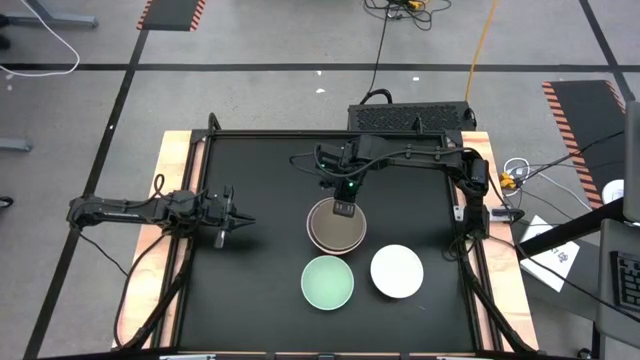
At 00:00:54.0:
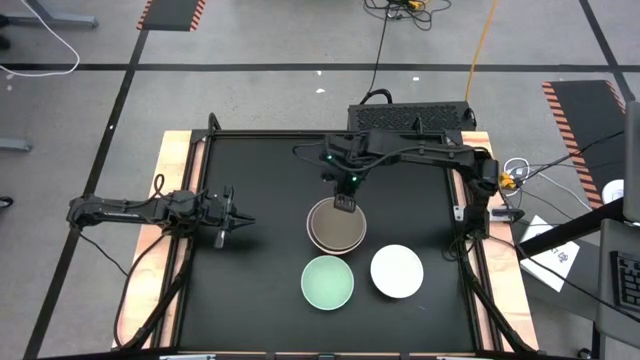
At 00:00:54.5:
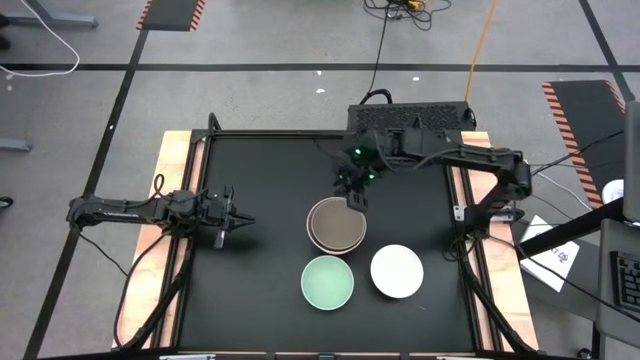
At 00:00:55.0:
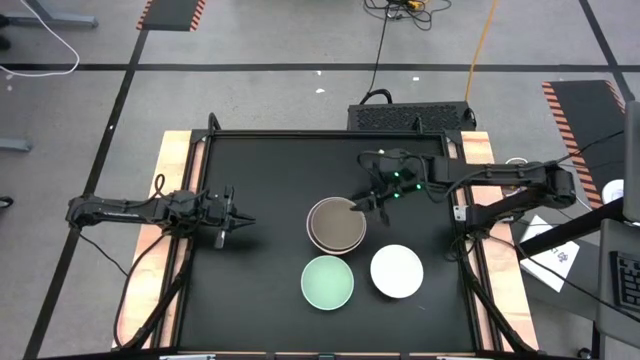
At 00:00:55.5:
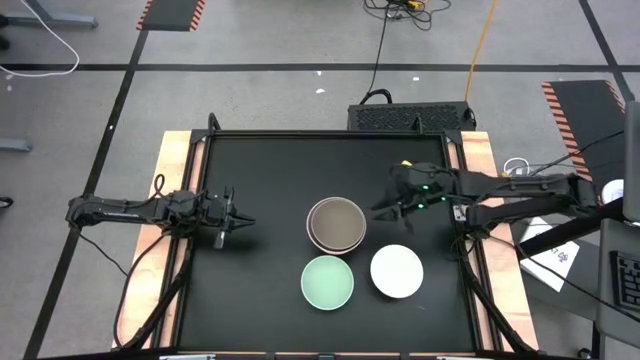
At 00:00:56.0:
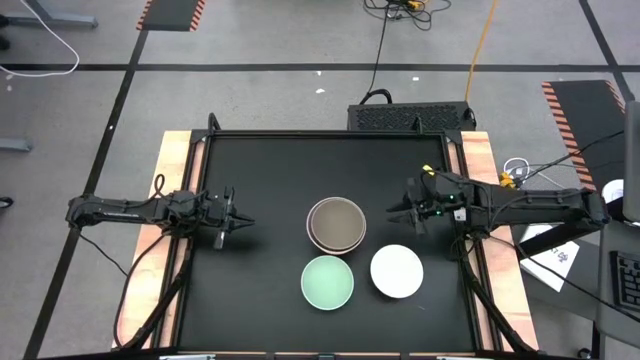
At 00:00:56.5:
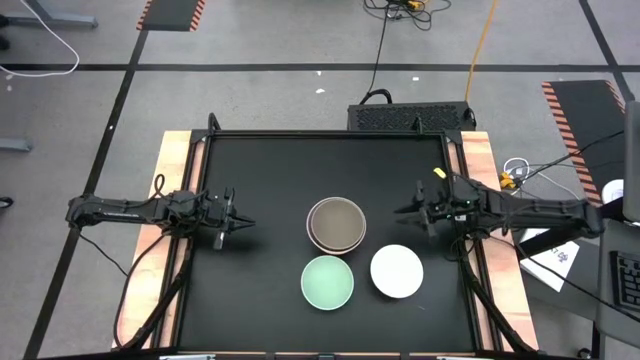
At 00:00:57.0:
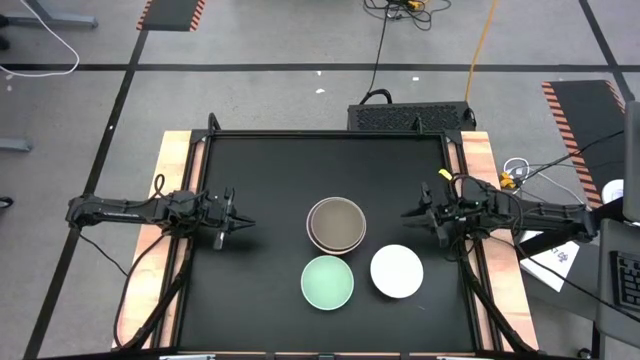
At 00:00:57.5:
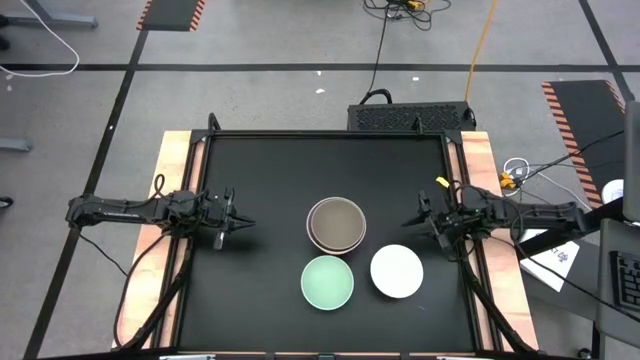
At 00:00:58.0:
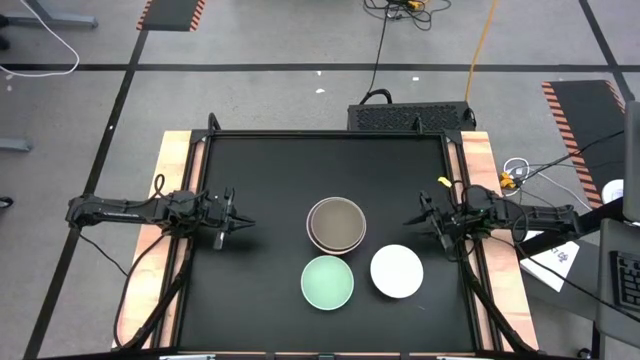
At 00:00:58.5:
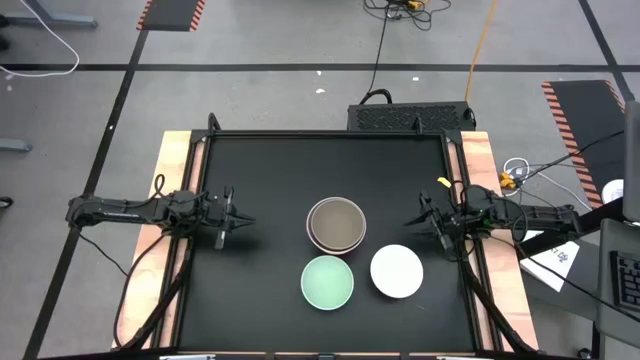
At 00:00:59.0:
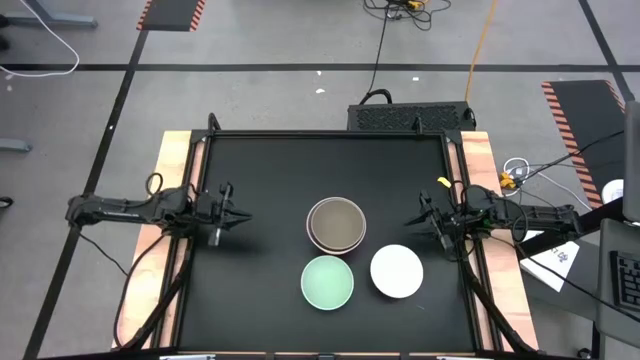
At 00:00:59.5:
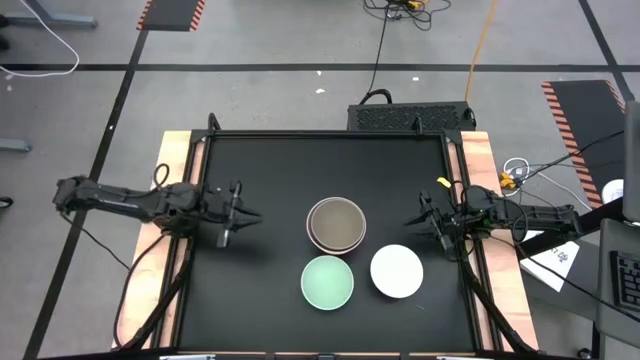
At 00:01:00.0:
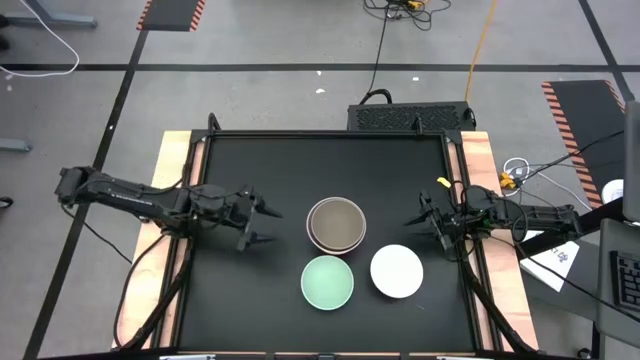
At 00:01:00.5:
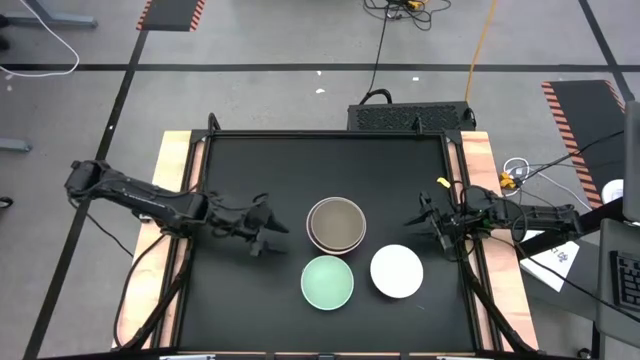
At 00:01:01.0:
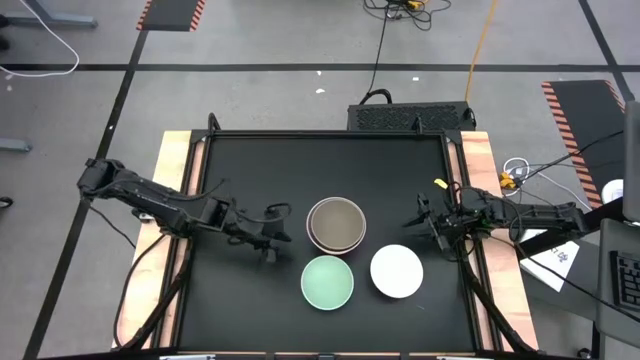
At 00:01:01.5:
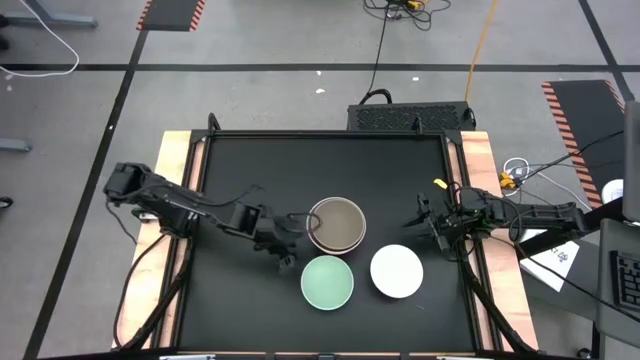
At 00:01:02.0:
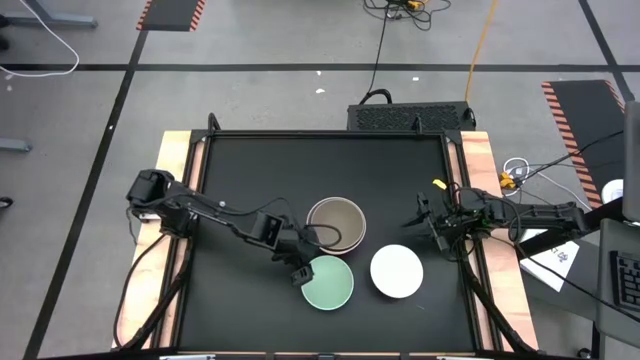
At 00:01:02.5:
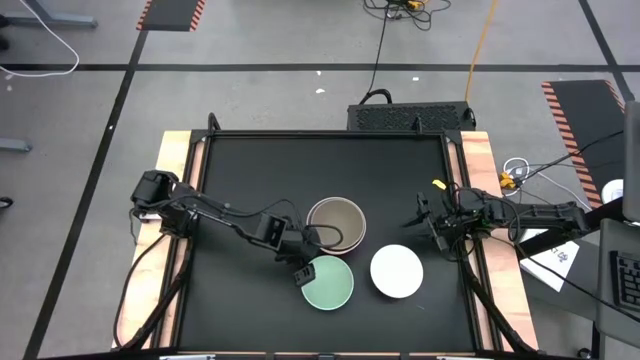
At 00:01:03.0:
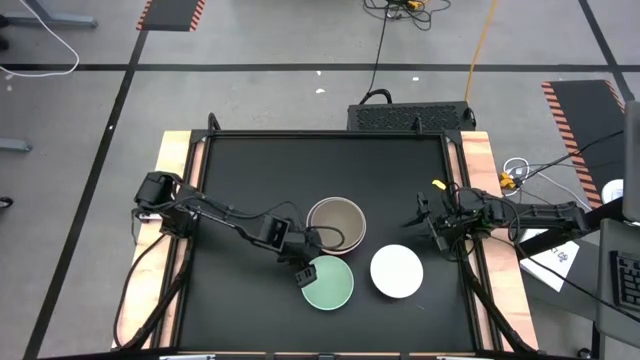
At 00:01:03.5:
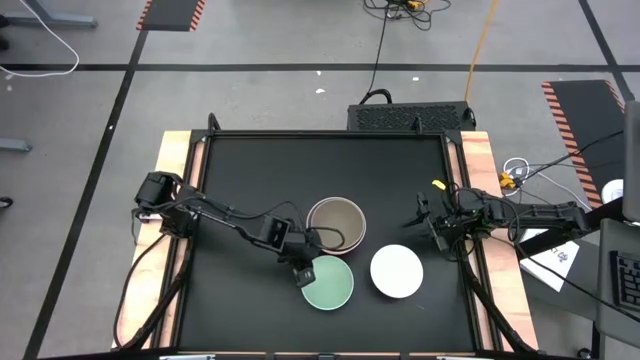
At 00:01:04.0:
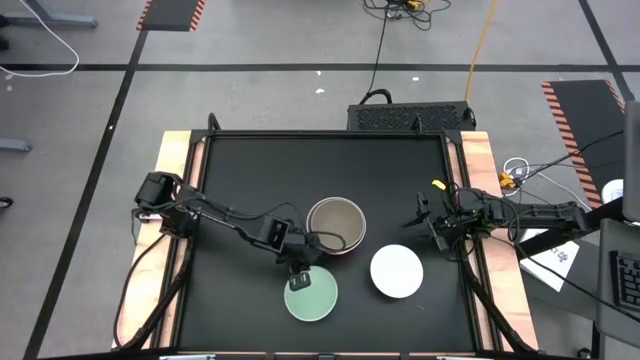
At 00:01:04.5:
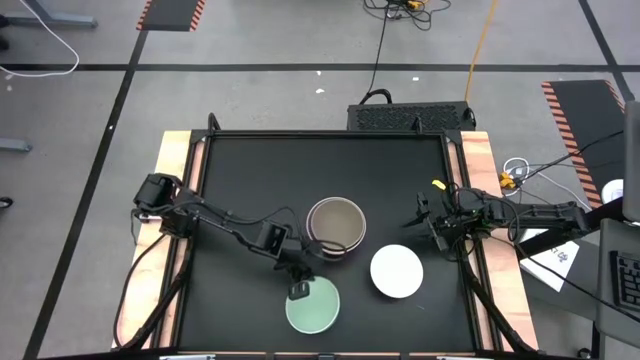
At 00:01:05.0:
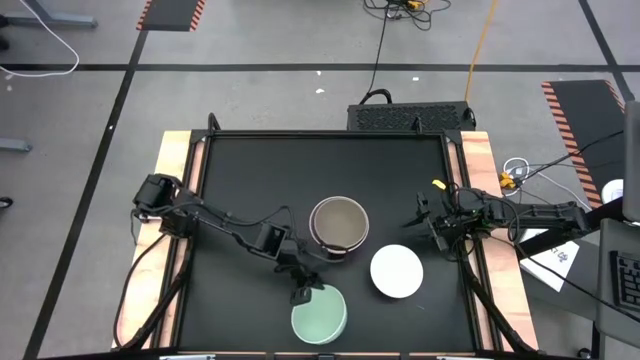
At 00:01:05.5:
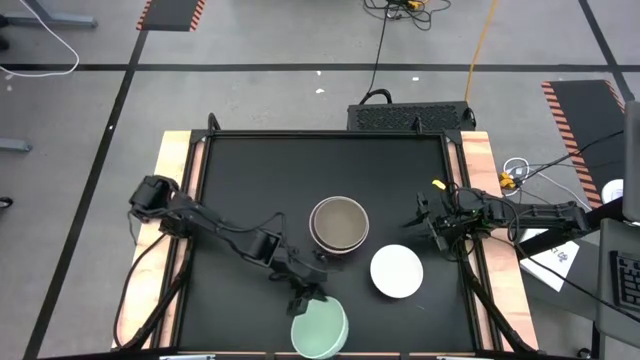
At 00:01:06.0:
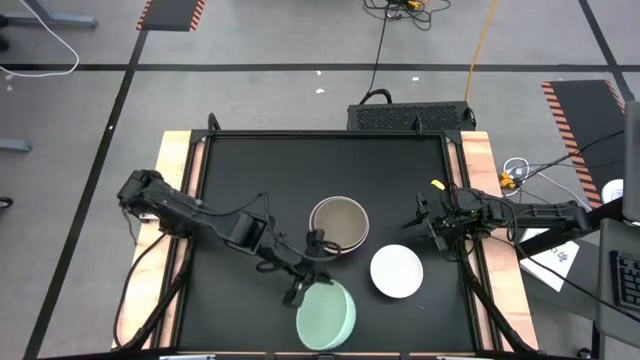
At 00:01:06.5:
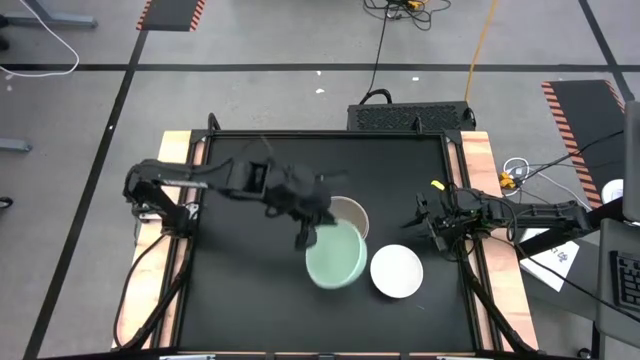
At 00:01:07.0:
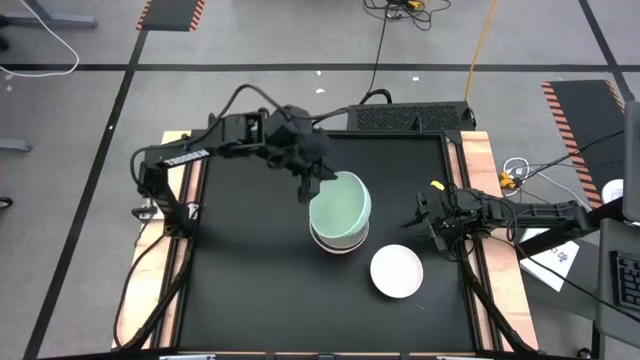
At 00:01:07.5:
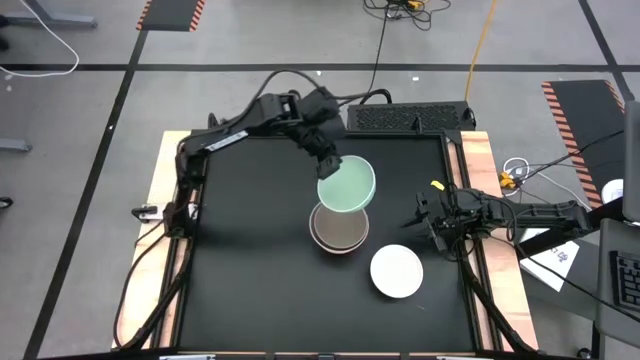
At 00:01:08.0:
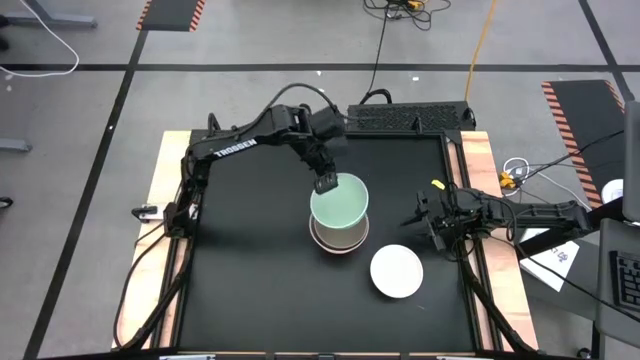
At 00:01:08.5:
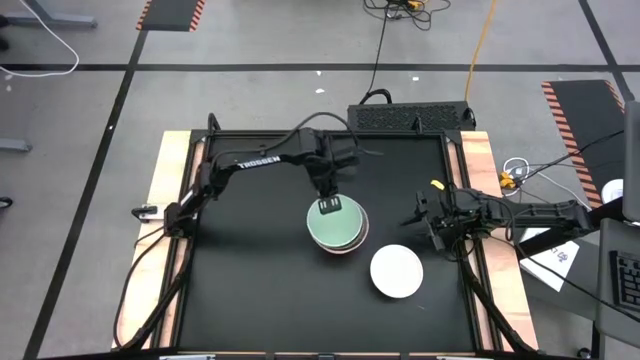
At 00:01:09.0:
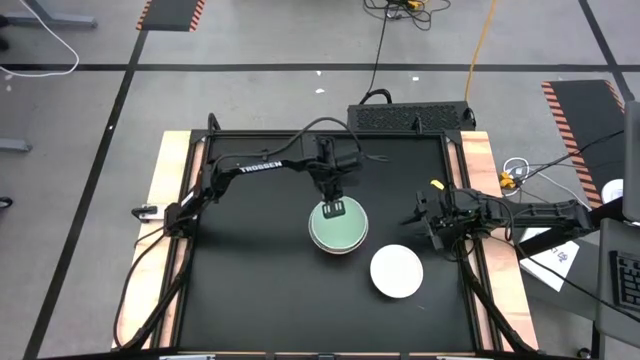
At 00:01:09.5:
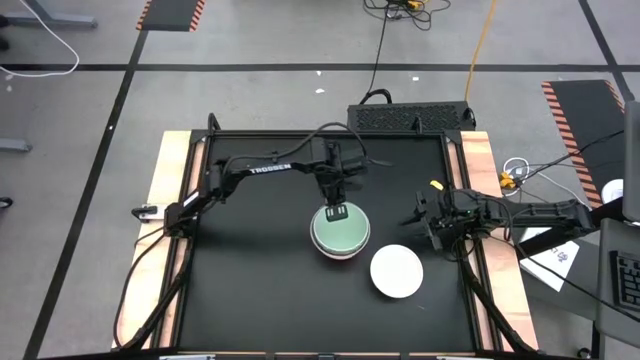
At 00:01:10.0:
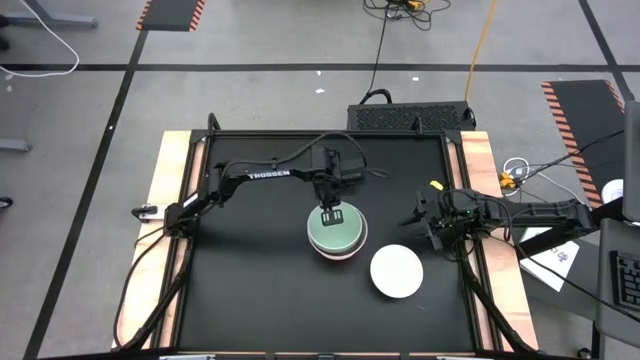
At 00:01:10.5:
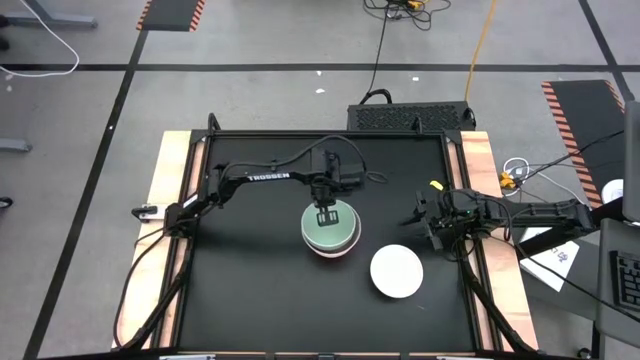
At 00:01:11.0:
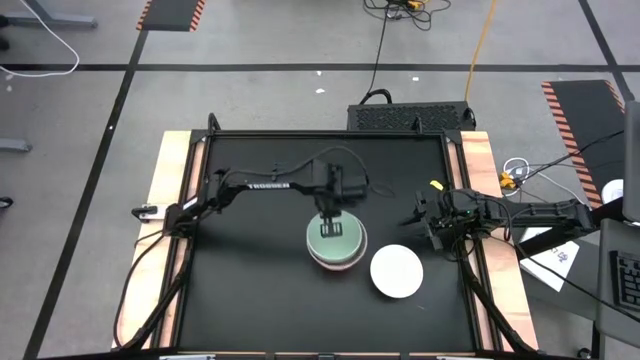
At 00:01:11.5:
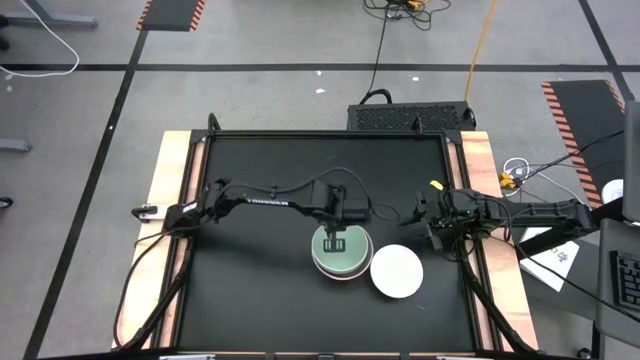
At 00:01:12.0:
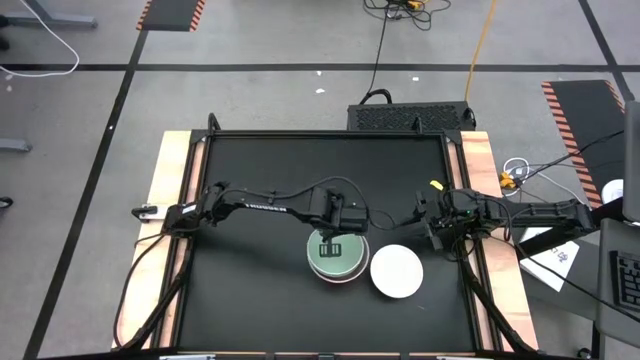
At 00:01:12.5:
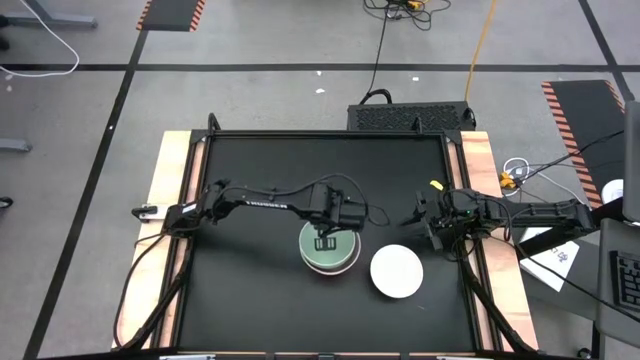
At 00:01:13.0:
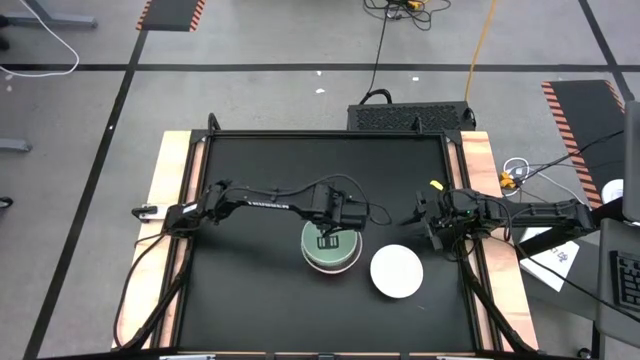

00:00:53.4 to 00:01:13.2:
Task: Nest bowls inside each other
Stack the light green bowl on the dark gray bowl
